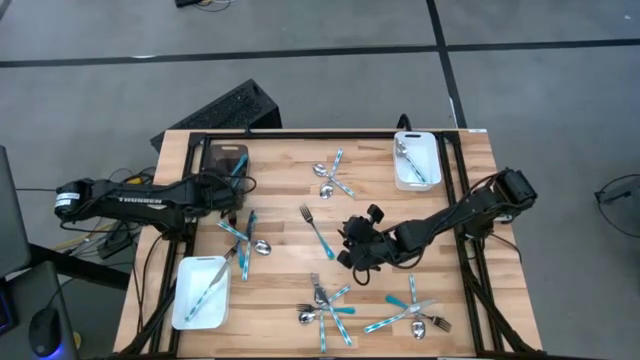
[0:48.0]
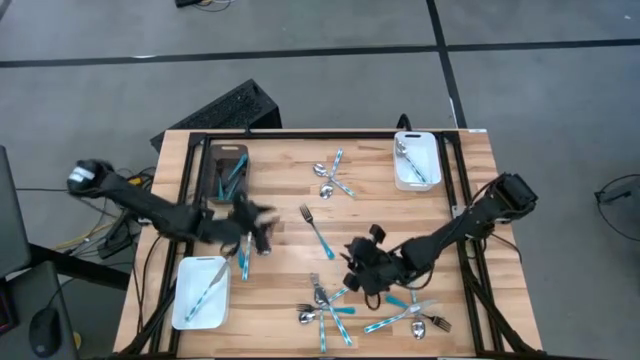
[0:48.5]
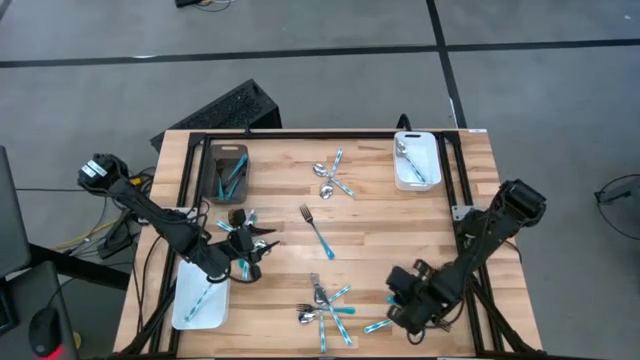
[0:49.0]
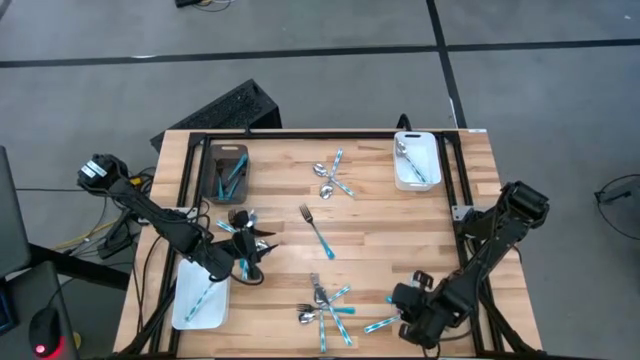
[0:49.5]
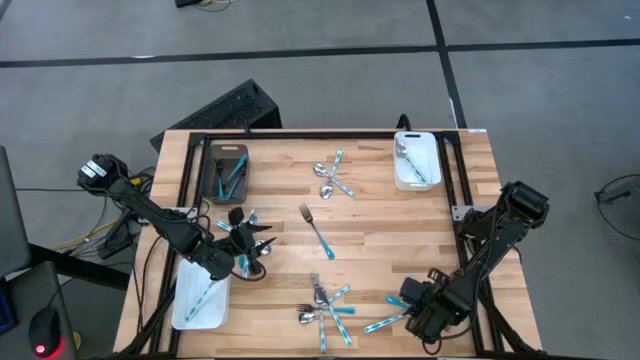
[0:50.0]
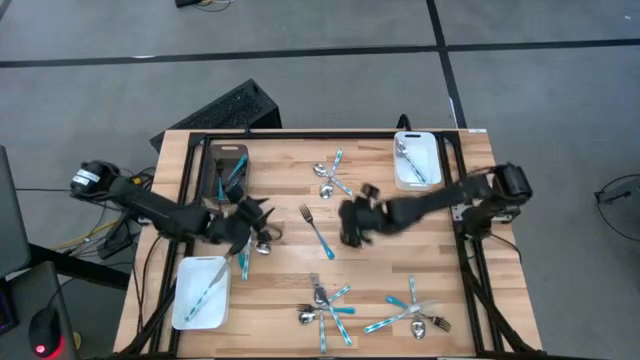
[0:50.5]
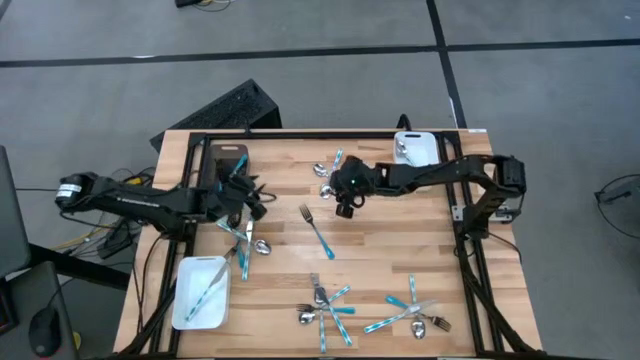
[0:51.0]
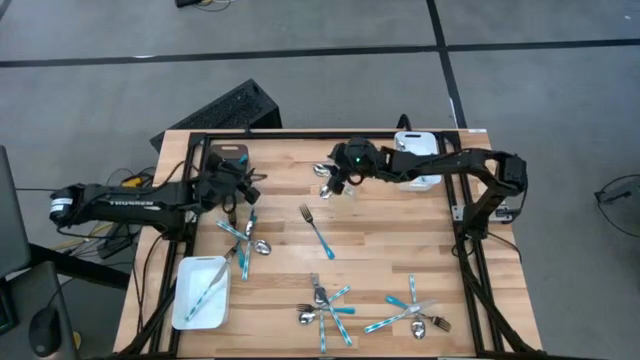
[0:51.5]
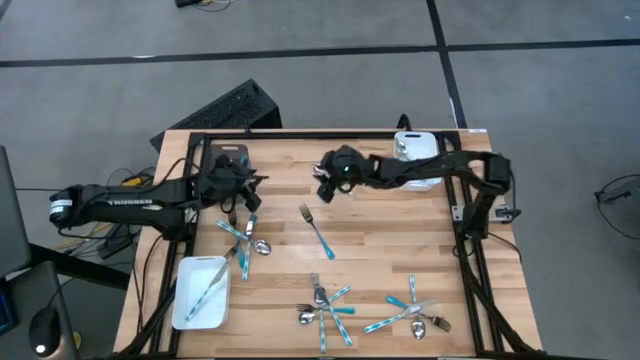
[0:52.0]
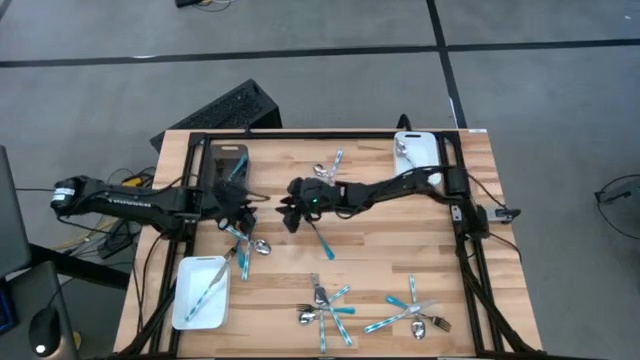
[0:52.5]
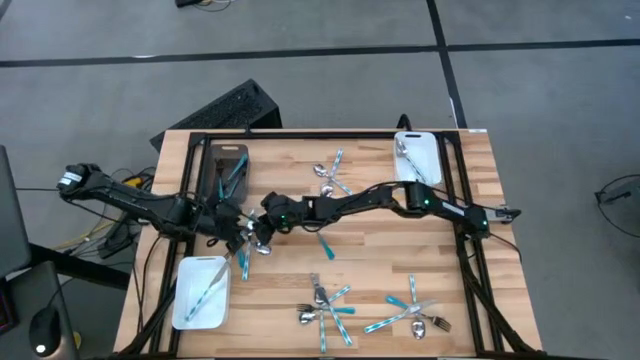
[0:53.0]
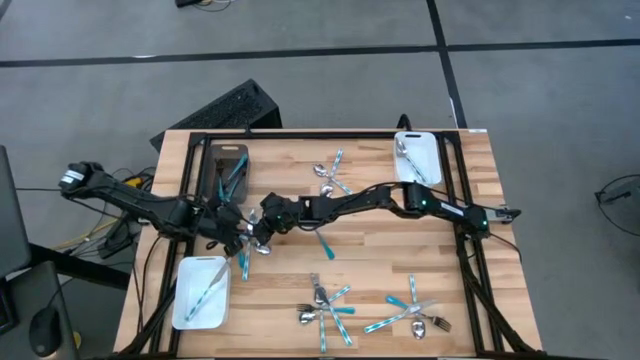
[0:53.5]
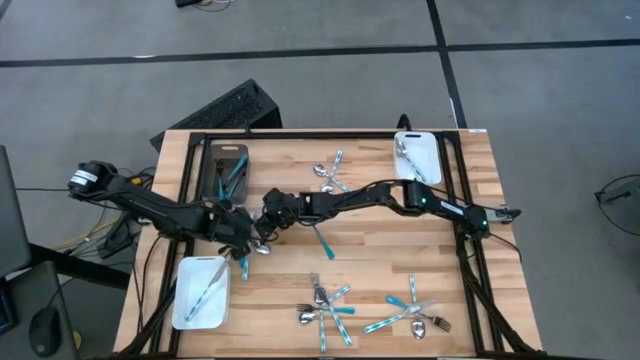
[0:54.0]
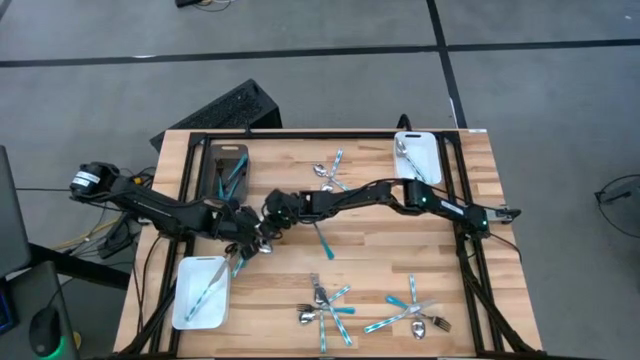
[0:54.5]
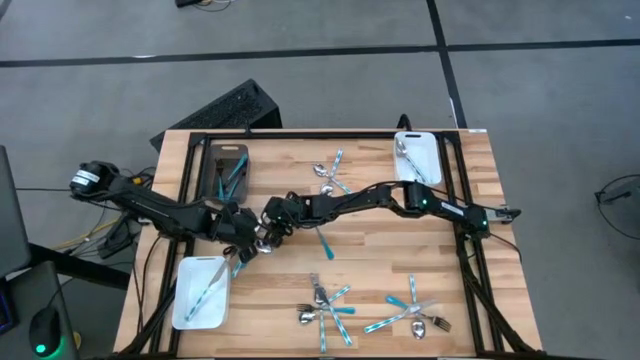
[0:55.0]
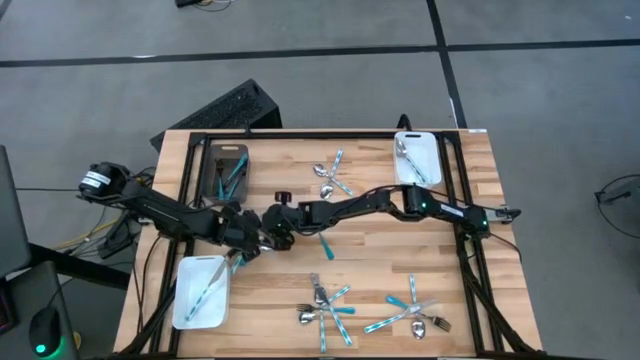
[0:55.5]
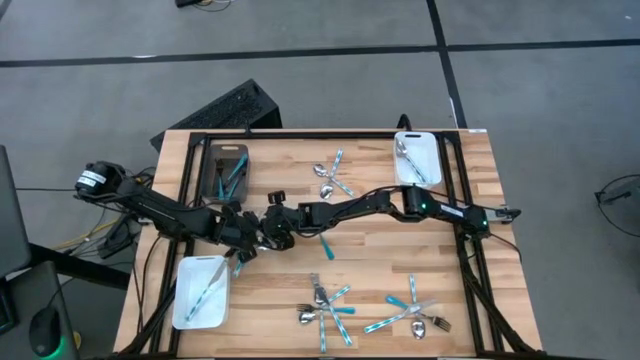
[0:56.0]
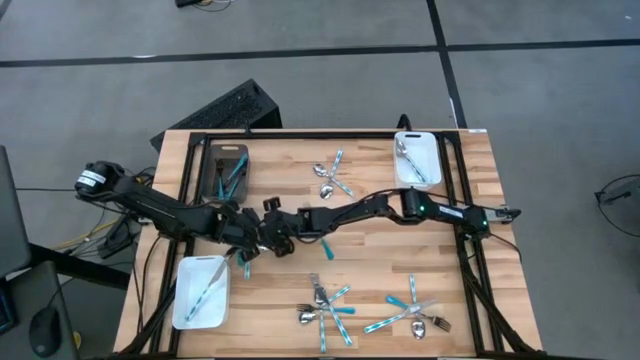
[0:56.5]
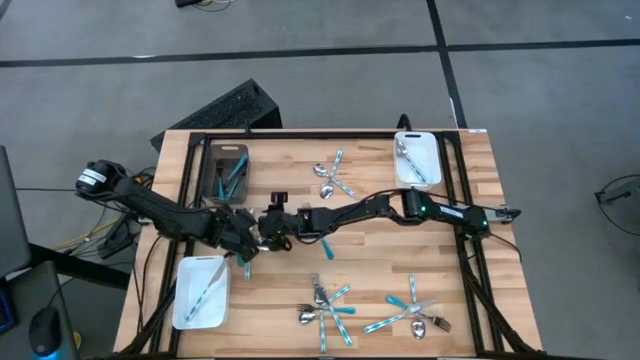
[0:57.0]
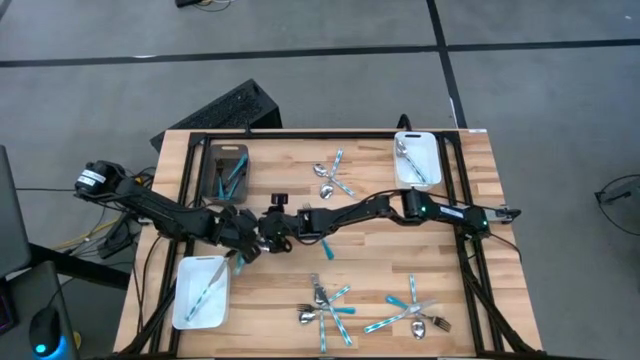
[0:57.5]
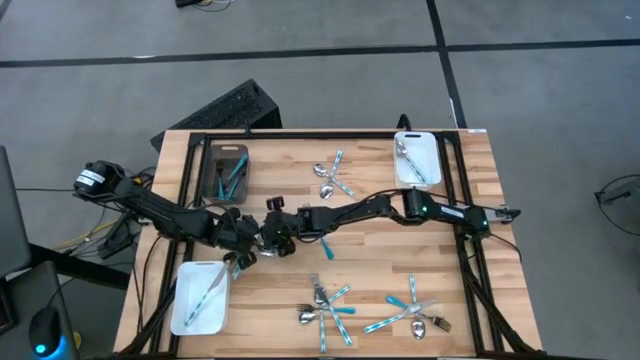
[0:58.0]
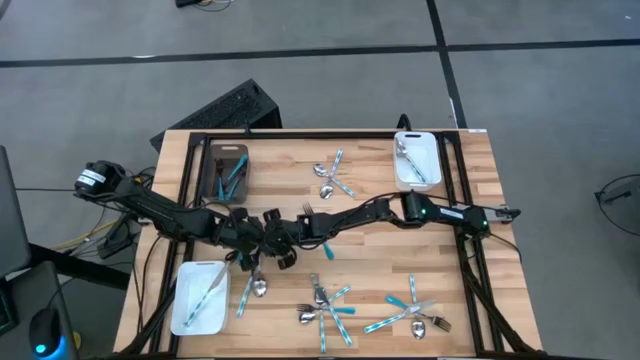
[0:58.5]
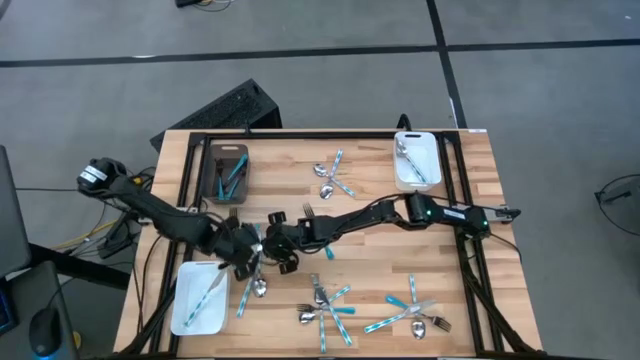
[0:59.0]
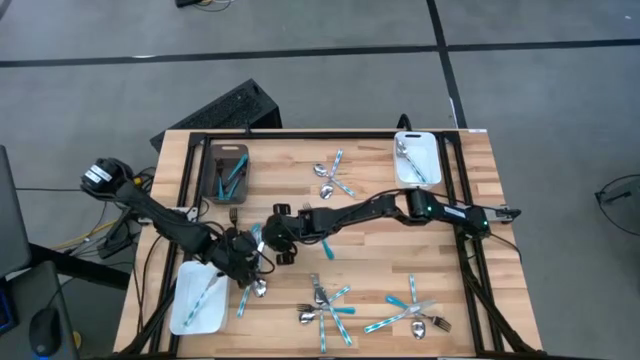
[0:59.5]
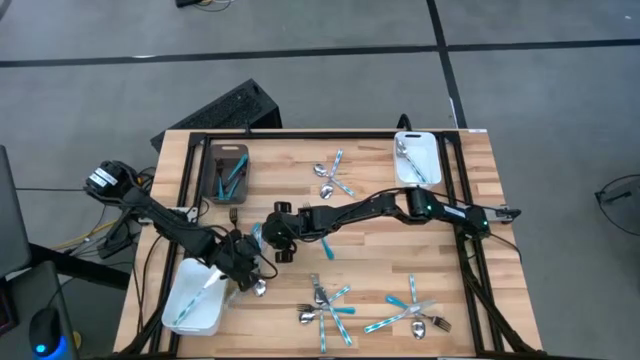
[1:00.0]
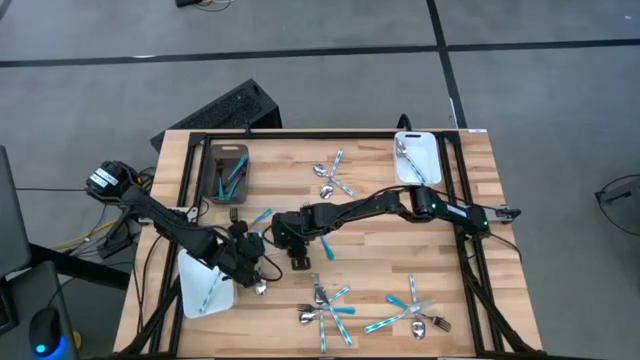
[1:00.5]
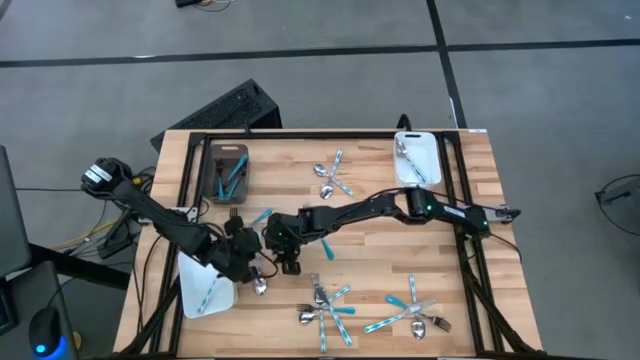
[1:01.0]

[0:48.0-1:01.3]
Task: Sort silverware by color (type)
Put the blue patterned knife into the bottom left white bin

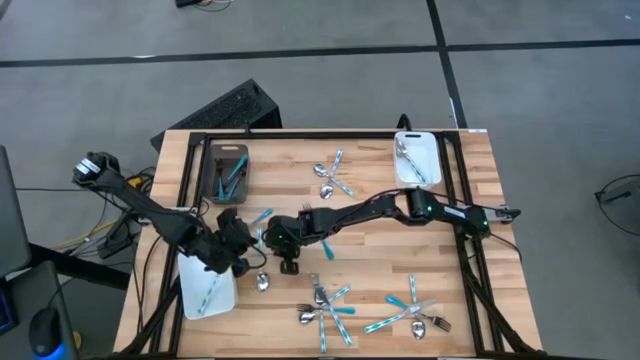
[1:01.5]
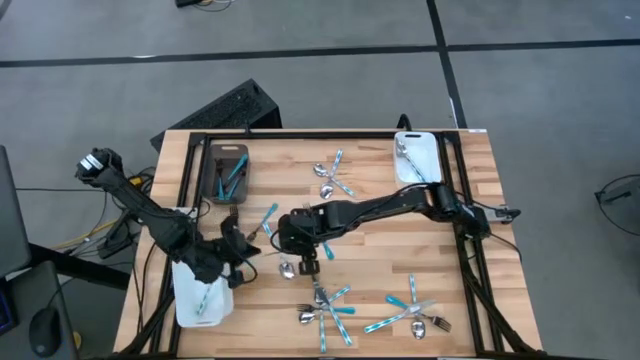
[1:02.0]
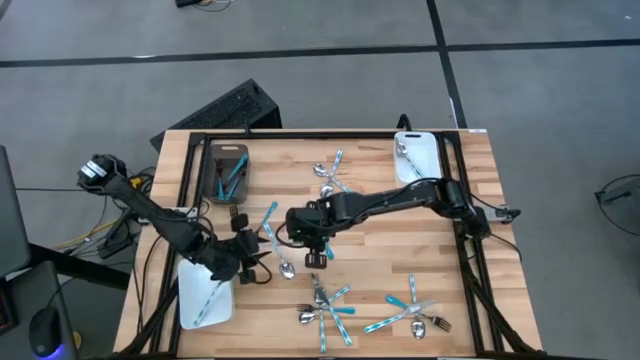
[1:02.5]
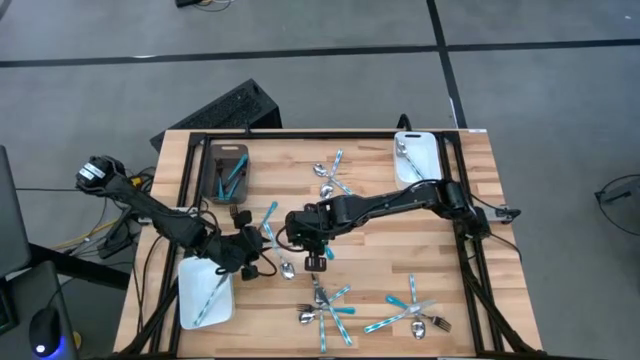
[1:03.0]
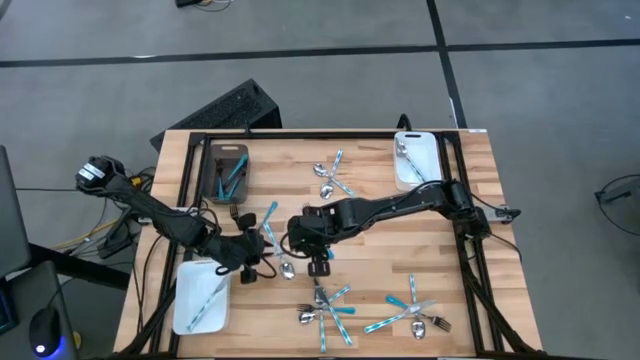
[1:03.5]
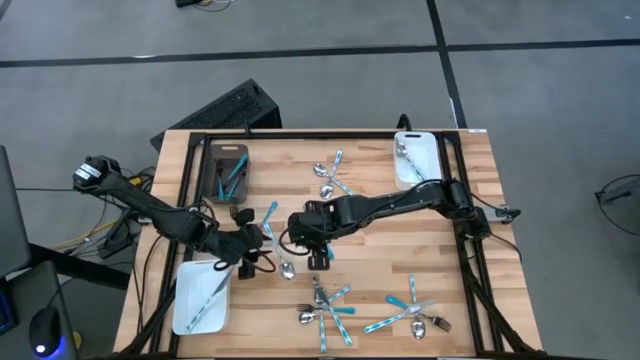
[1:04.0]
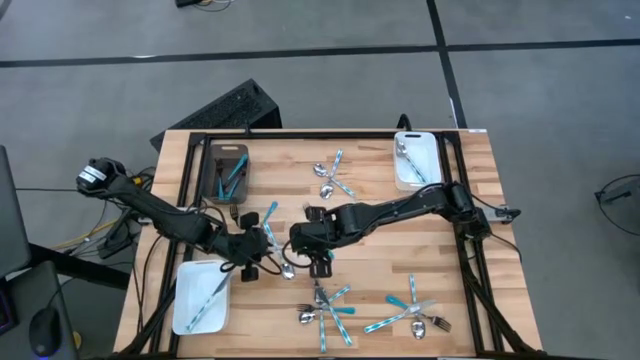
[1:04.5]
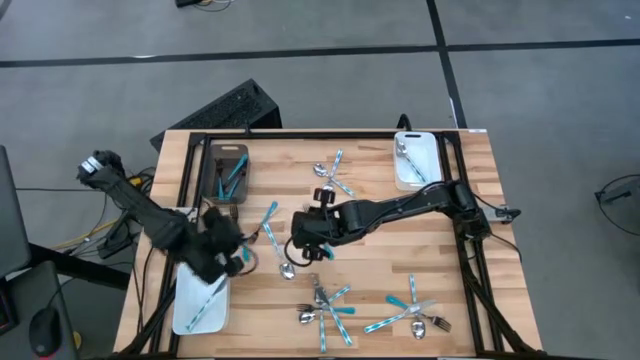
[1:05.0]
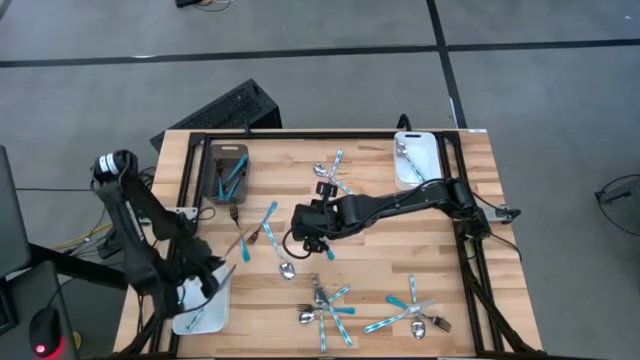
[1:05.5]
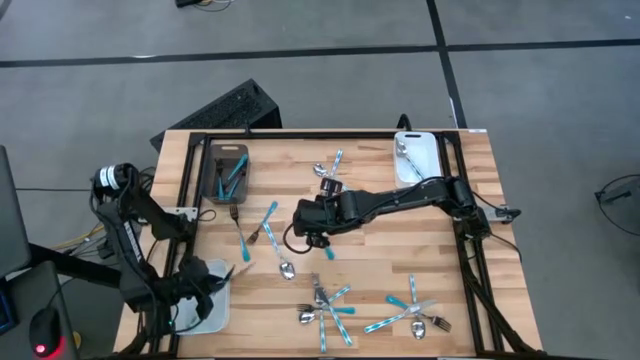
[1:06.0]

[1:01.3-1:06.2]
Put the blue patterned table knife into the bottom left white bin

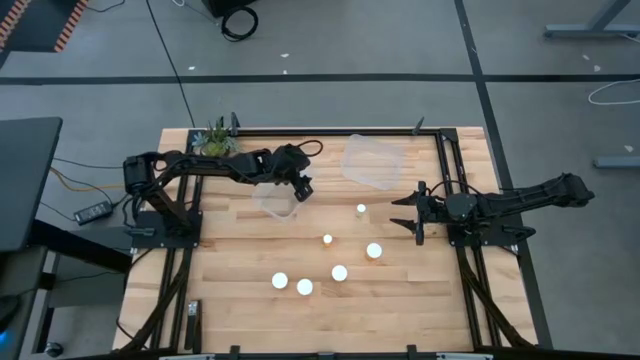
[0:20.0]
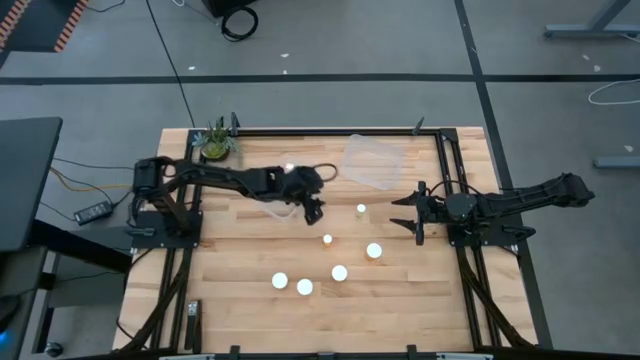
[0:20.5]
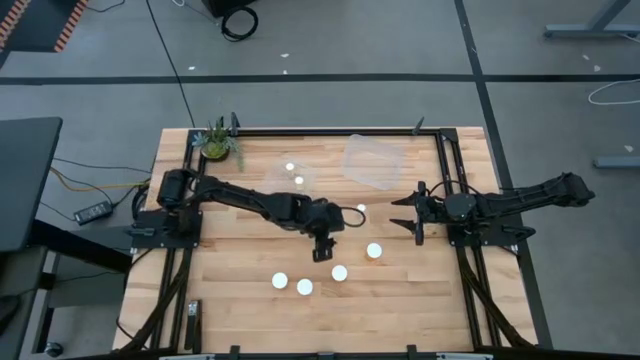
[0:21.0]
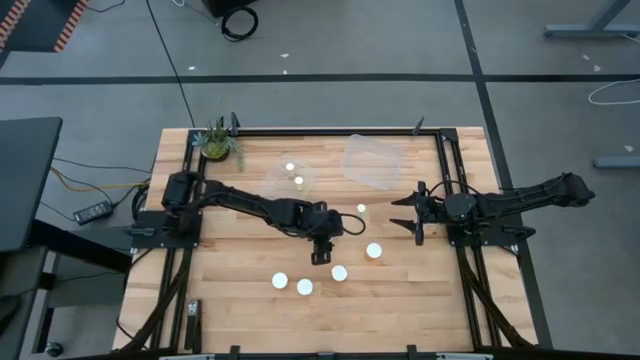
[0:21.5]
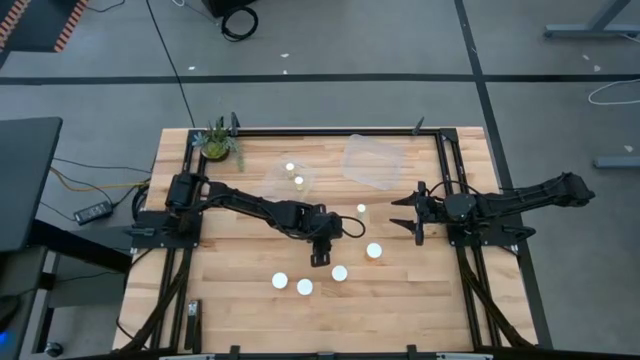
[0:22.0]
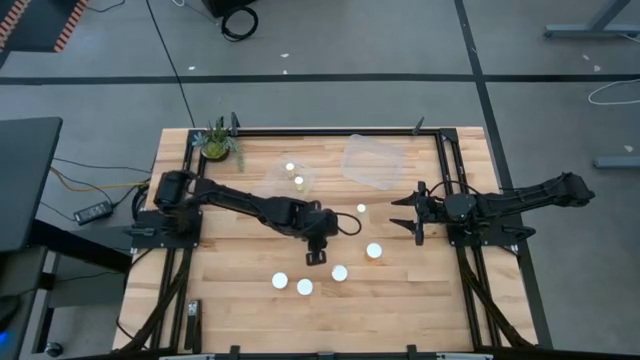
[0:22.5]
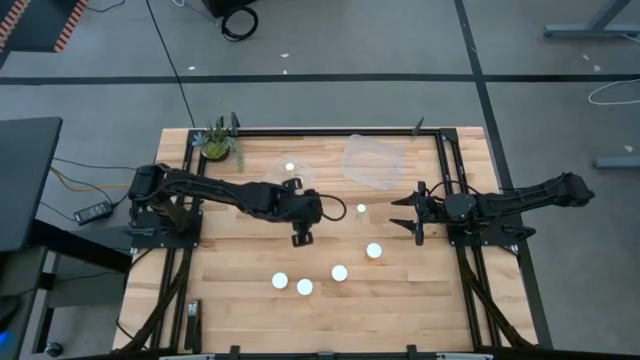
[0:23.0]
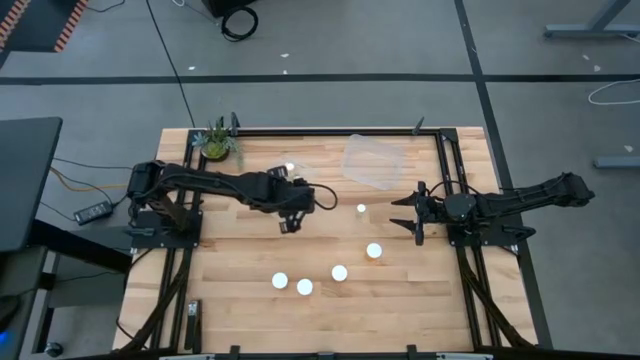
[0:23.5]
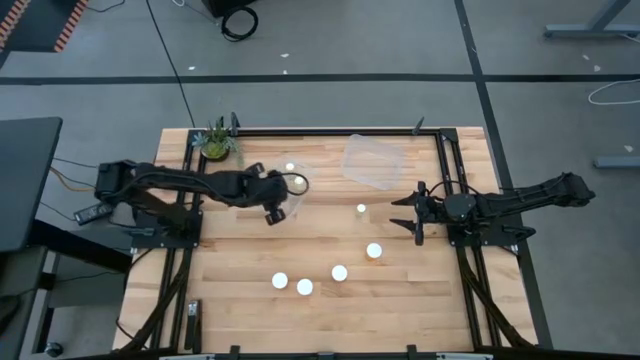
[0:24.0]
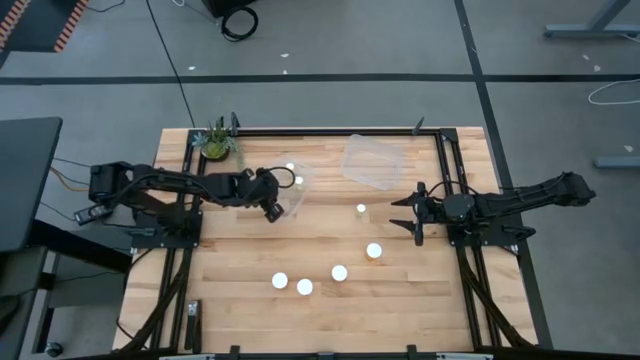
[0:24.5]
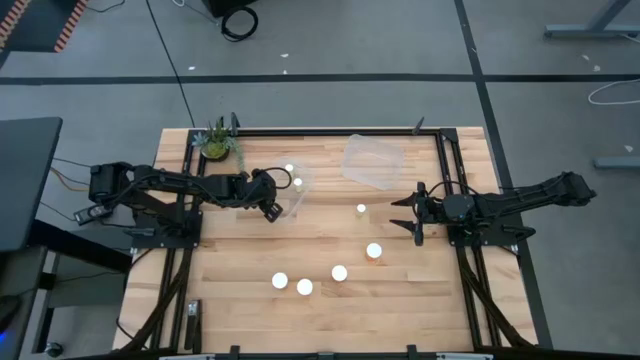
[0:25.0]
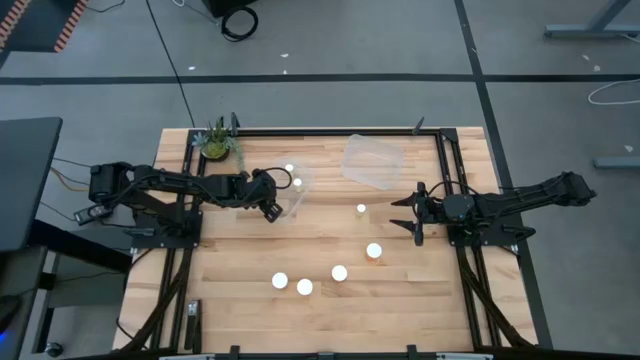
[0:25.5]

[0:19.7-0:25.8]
Task: Pick and place medicine bottles into bin by pill shape (circle, oval)
Put the small orange pill bottle into the left transparent bin
